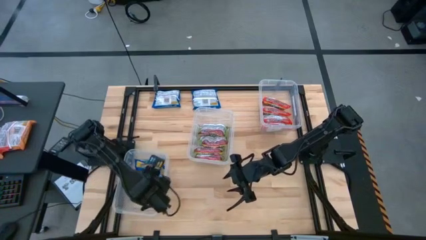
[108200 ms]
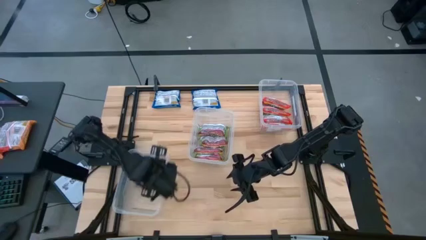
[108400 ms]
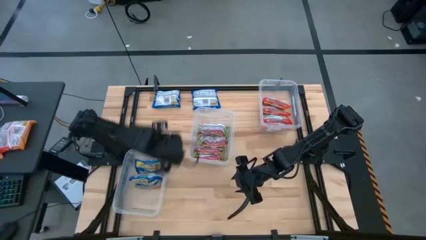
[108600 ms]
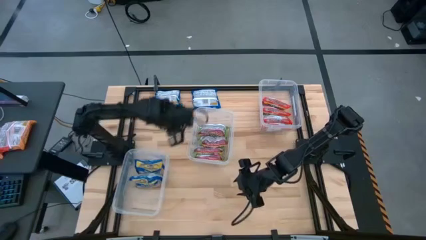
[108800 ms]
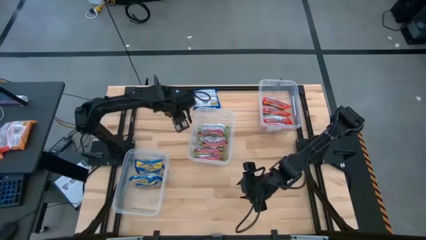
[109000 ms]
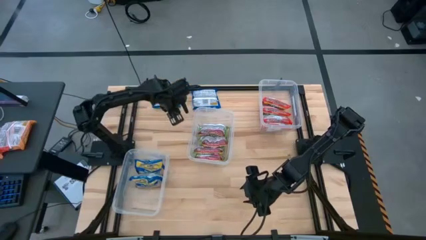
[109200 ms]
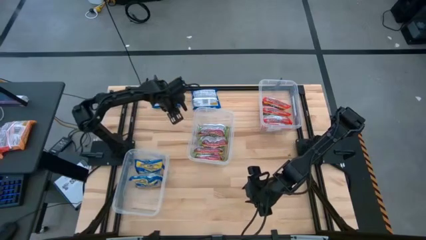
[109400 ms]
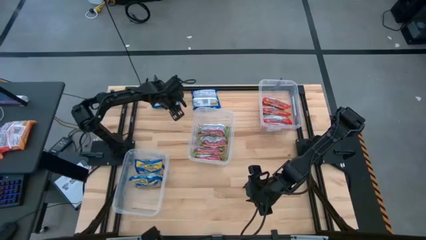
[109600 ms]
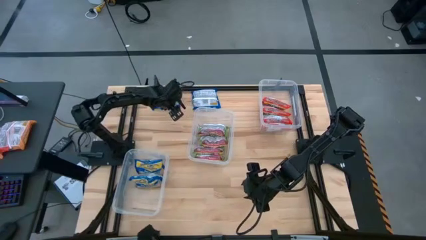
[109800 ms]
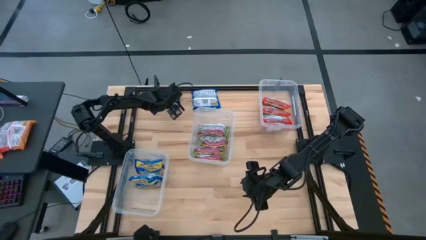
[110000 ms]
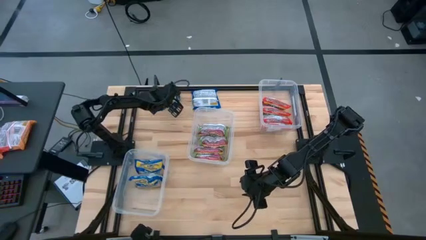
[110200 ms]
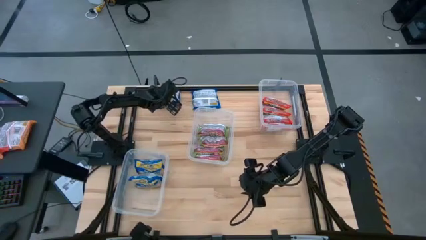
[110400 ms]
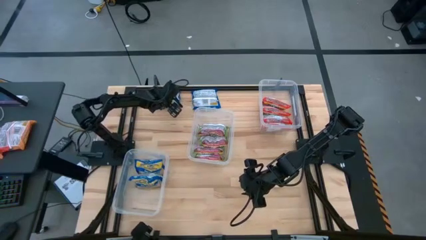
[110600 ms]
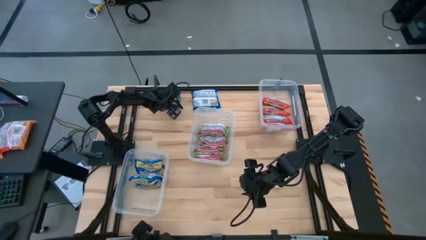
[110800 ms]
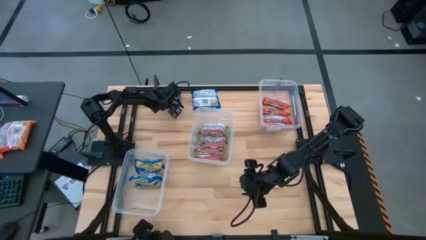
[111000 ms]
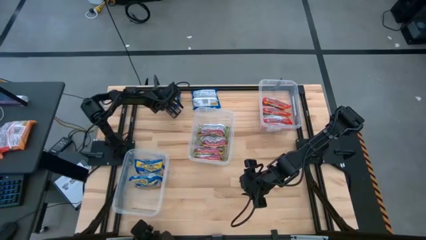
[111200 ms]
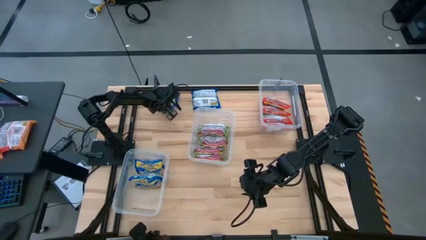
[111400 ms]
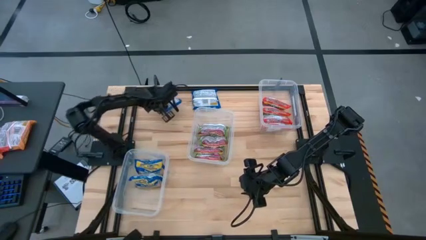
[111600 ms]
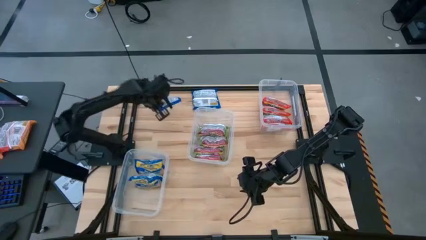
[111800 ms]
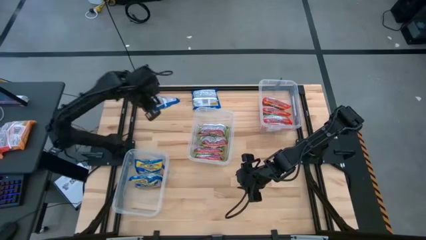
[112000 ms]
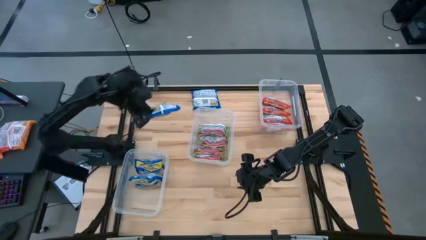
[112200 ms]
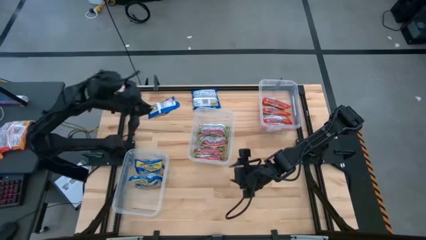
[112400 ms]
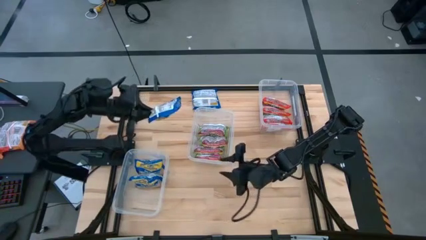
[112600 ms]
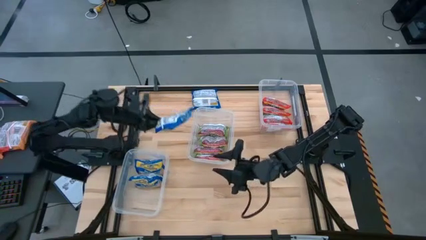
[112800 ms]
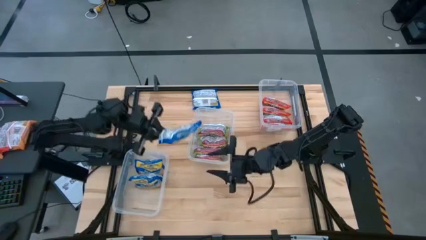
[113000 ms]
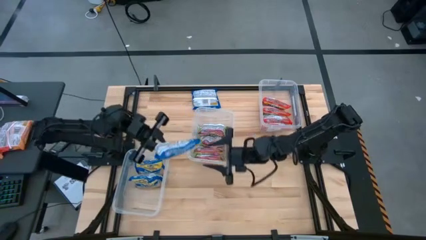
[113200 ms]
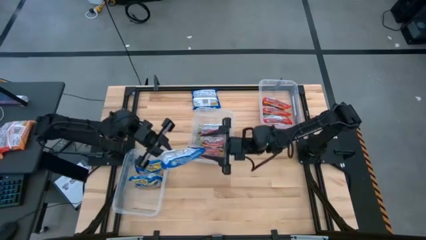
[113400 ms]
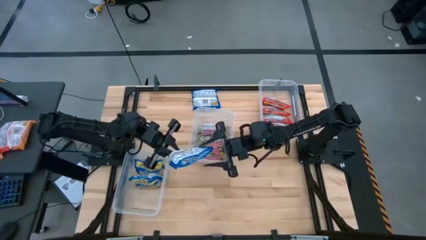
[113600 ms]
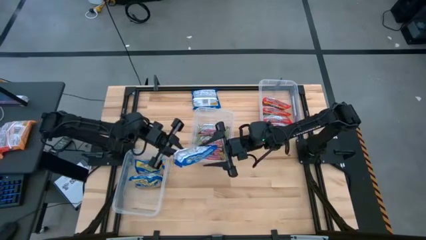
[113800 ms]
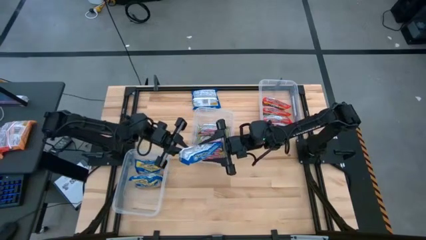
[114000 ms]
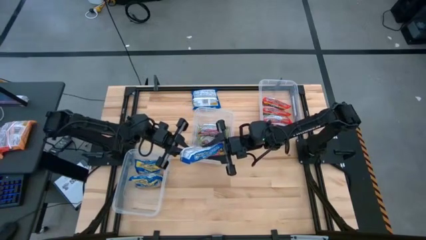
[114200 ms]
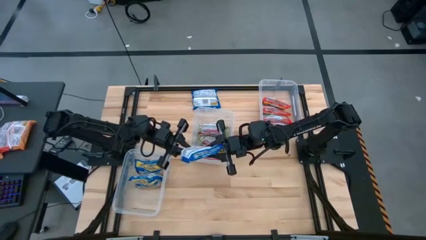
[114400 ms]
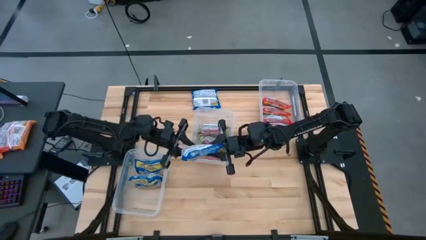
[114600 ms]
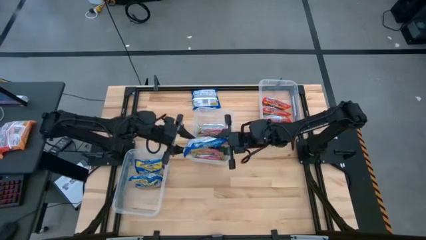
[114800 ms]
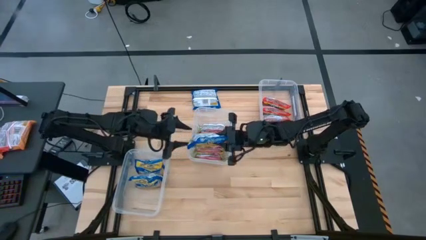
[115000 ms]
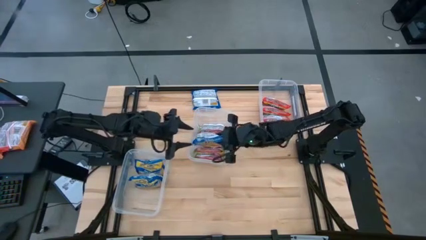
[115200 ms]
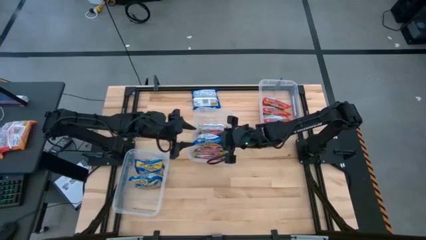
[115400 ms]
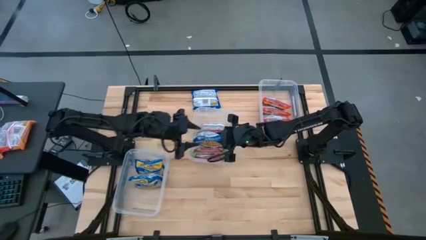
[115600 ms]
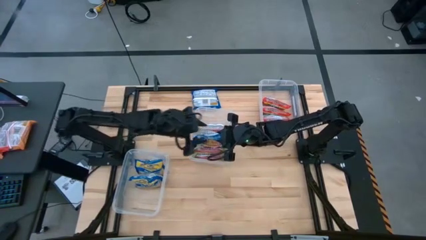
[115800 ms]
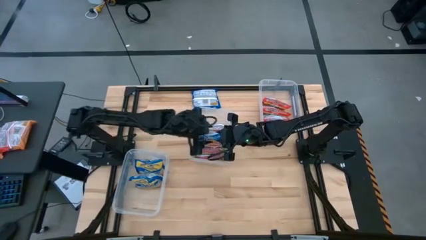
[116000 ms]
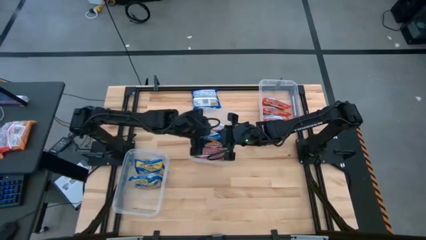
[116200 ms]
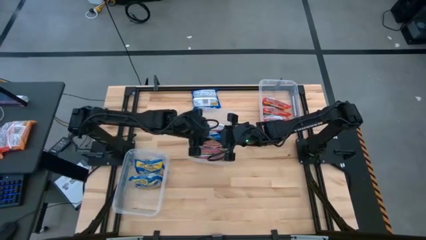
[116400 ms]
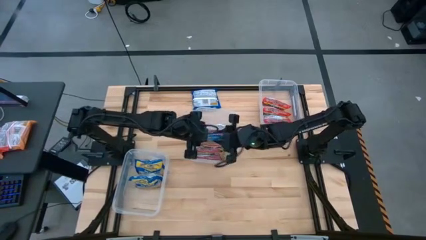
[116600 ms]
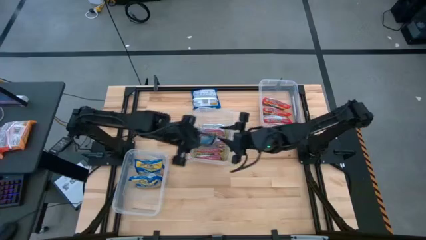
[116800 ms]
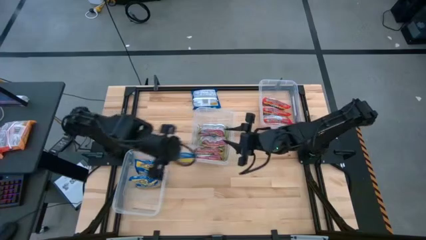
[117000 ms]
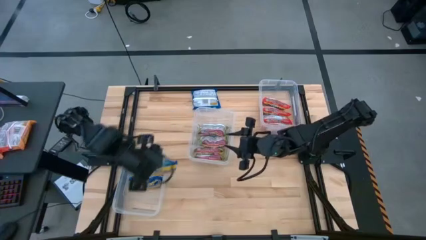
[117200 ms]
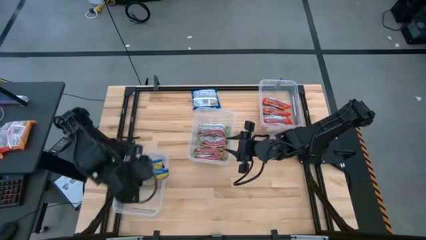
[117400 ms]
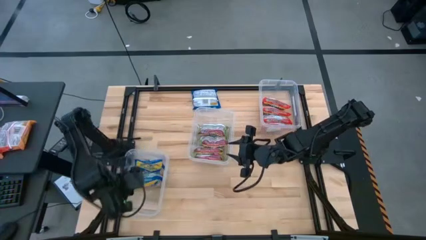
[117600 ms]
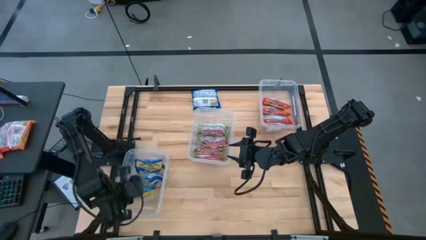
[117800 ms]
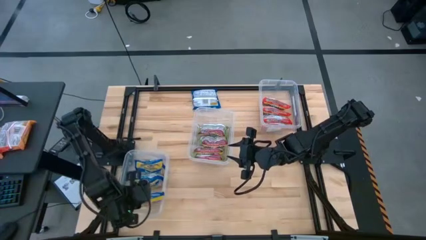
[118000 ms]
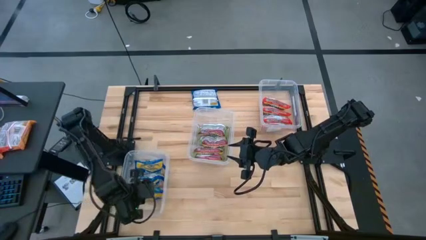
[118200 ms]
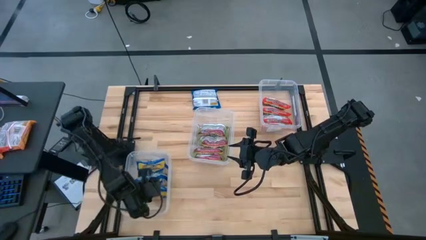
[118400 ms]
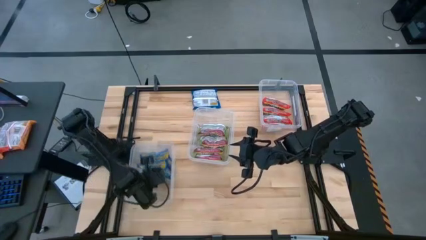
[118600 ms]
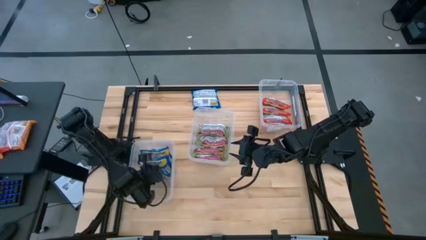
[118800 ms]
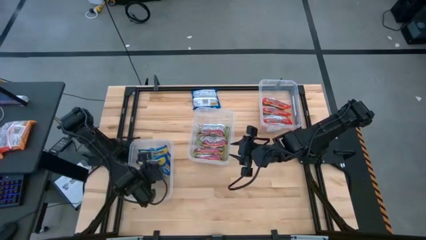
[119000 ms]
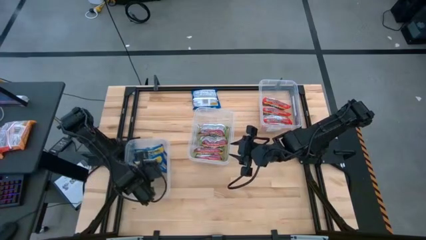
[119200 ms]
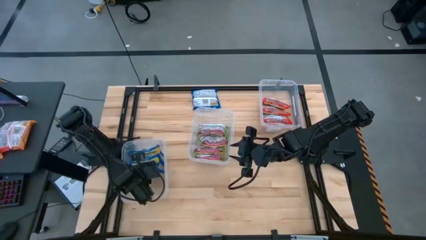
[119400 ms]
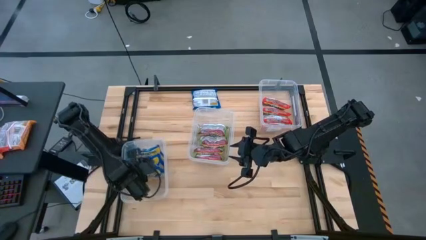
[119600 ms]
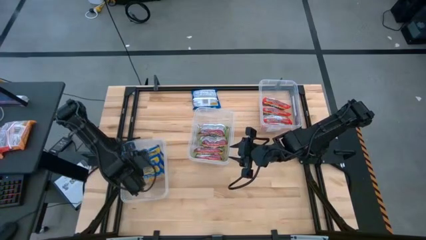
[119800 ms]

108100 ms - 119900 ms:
Task: Sort Maruchan noodles
Put the blue noodle pack into the bottom transparent container

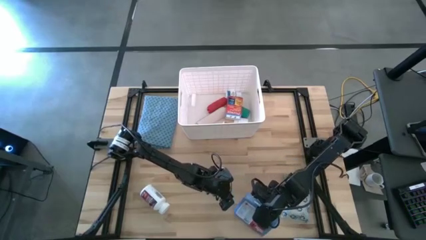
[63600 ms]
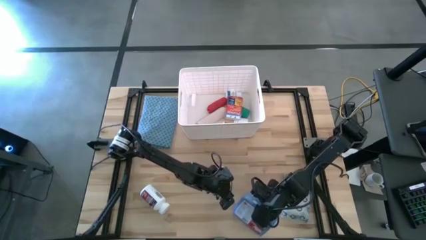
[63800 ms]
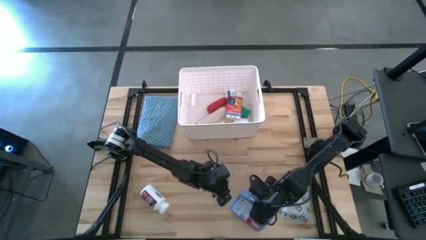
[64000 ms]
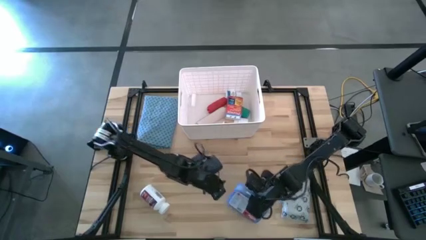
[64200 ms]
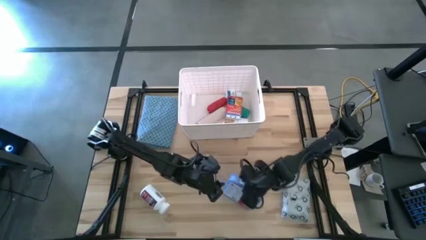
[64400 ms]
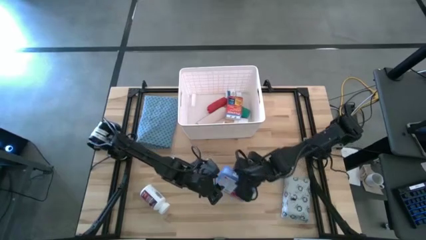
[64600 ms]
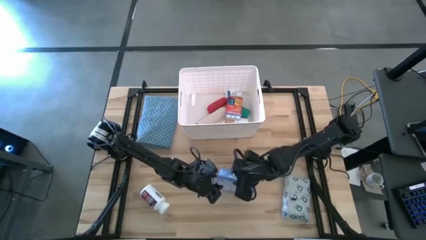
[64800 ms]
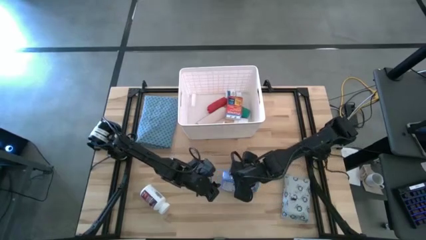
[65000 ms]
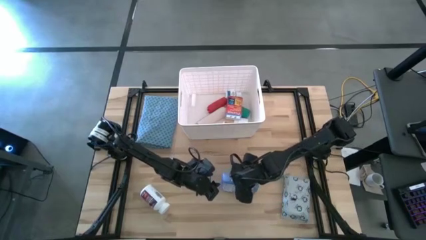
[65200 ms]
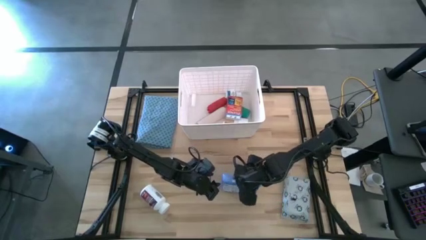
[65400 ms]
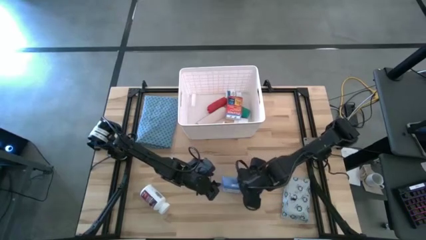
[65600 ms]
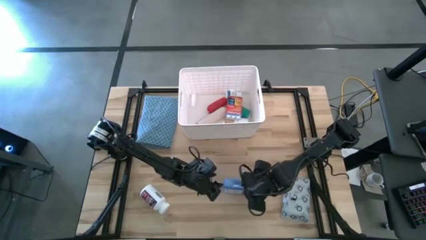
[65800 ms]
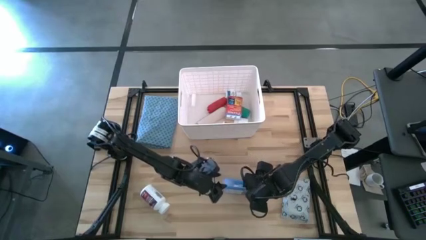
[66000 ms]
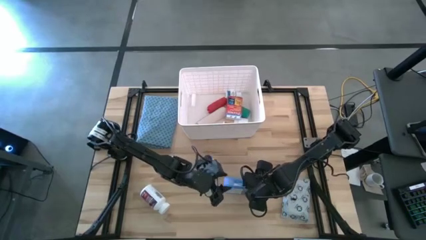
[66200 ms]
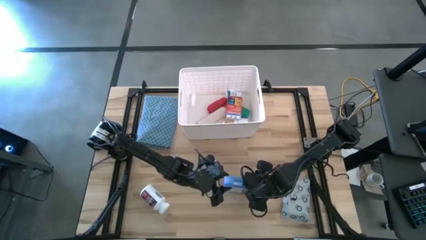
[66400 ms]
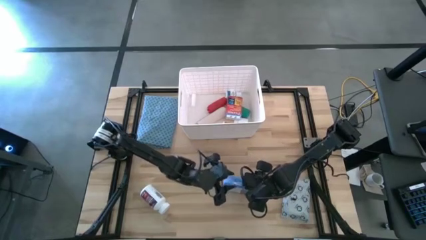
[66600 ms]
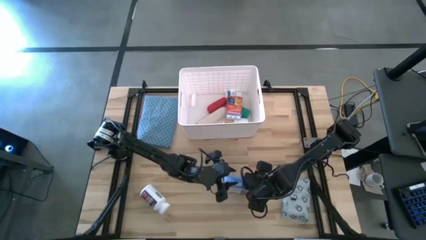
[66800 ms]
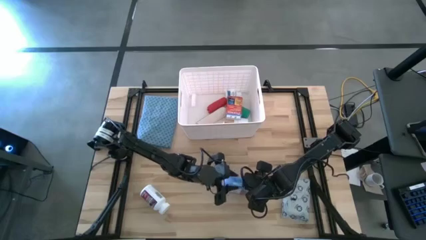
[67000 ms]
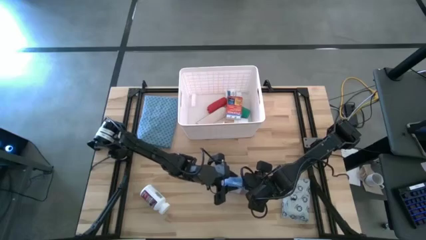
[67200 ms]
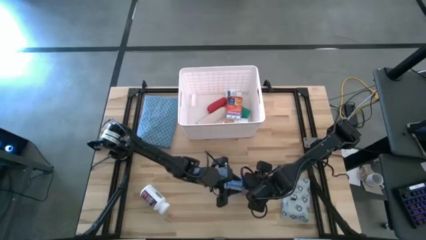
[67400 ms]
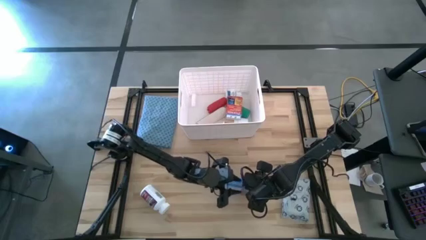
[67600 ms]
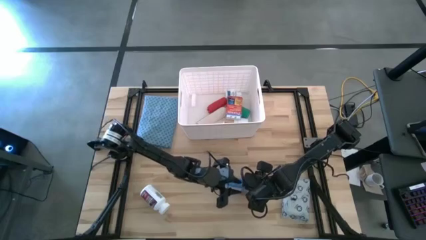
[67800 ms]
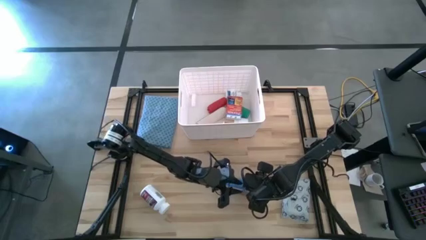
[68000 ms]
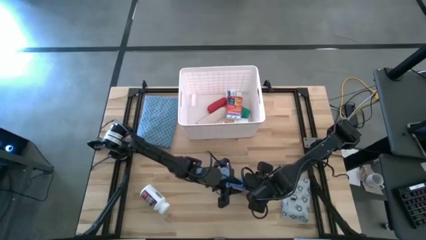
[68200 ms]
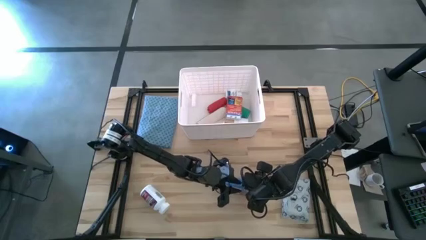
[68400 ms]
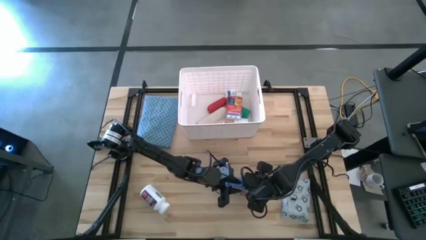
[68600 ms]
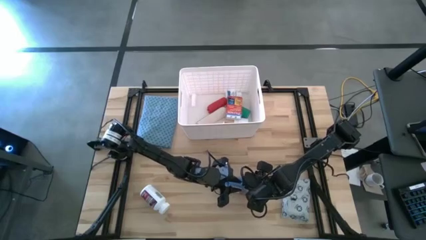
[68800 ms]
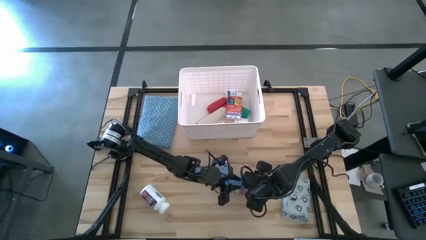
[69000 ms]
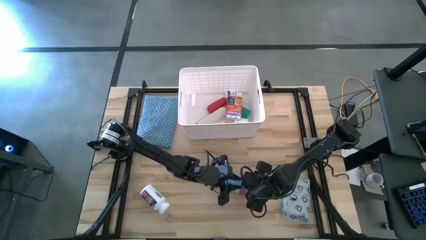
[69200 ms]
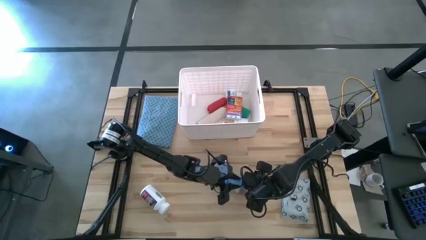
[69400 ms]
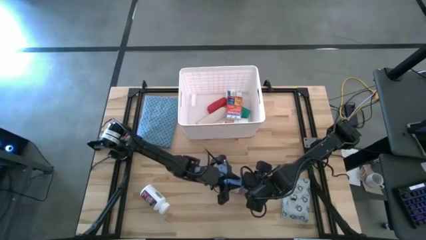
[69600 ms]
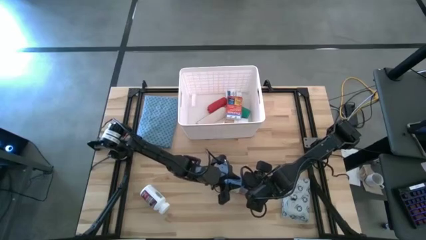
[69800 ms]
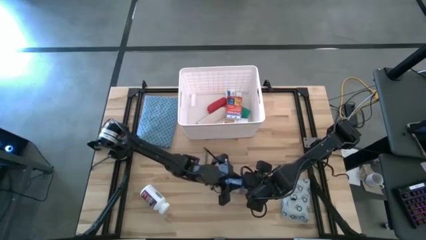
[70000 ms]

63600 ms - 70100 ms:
Task: Pick & place medical supplies in basket/bin
Close the blue first aid kit
